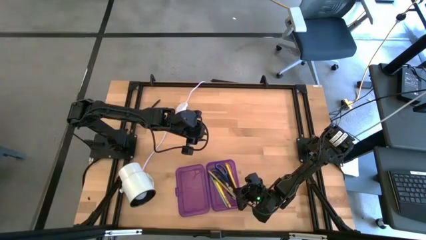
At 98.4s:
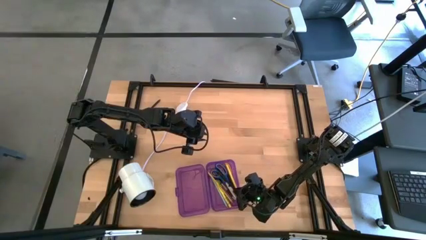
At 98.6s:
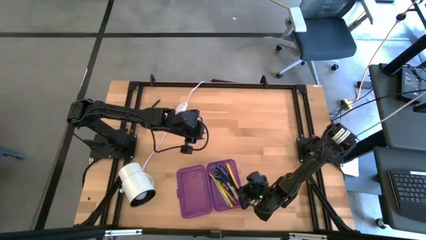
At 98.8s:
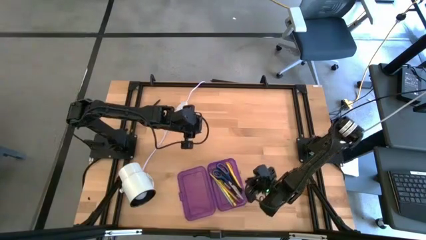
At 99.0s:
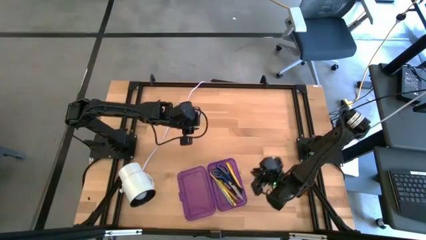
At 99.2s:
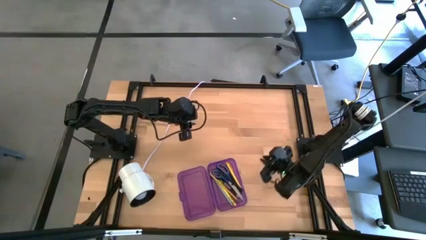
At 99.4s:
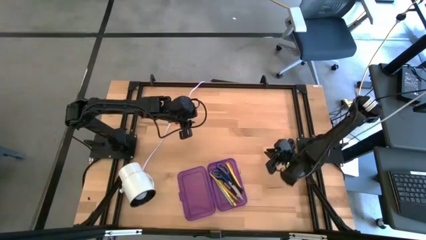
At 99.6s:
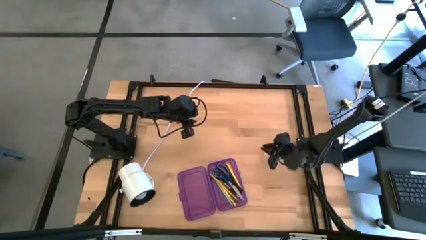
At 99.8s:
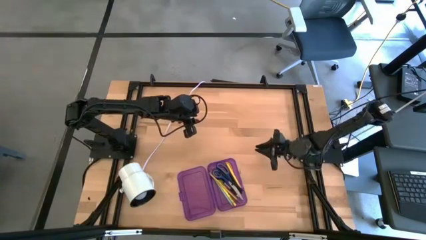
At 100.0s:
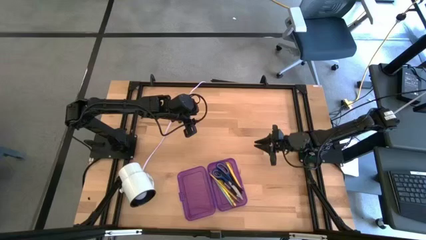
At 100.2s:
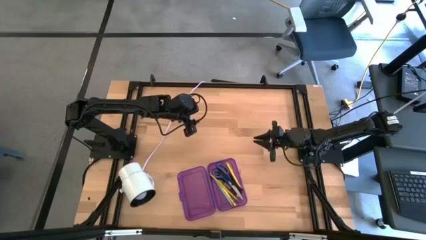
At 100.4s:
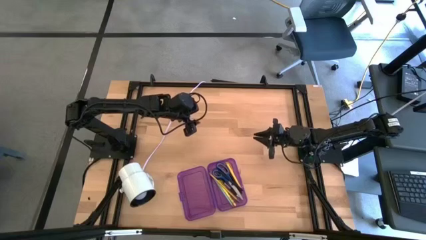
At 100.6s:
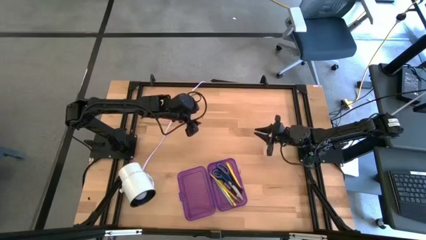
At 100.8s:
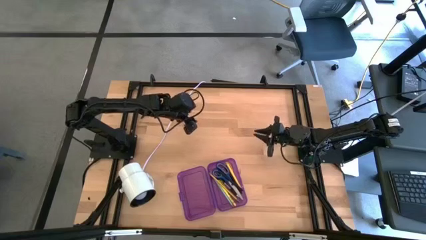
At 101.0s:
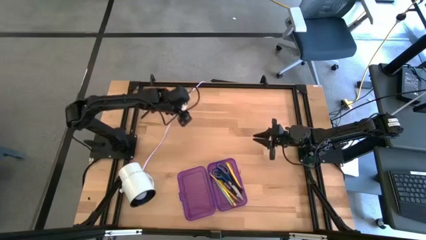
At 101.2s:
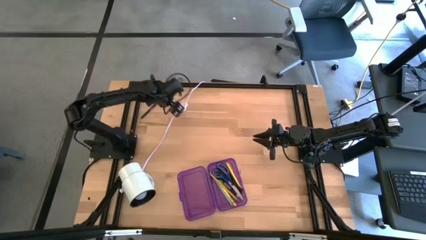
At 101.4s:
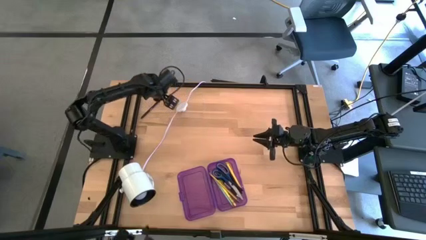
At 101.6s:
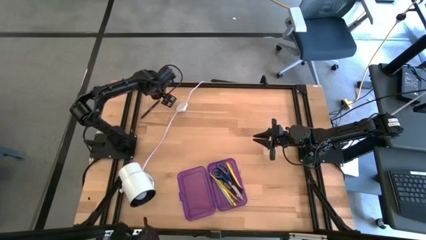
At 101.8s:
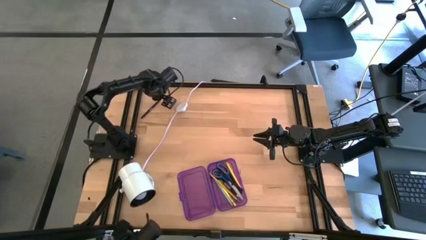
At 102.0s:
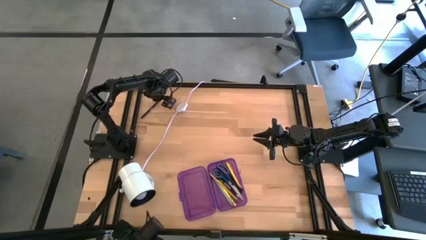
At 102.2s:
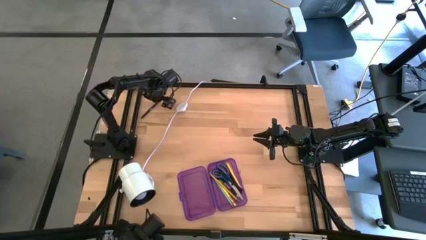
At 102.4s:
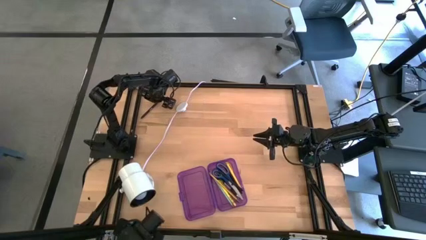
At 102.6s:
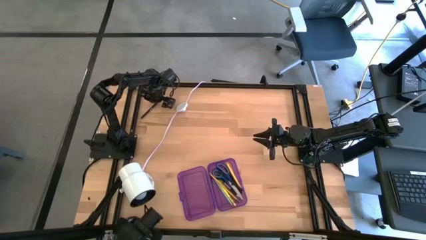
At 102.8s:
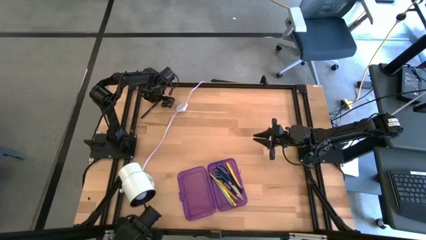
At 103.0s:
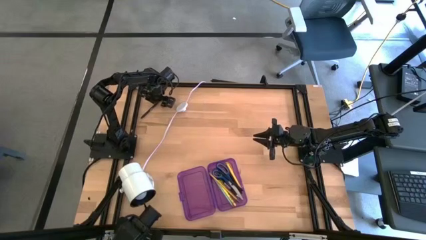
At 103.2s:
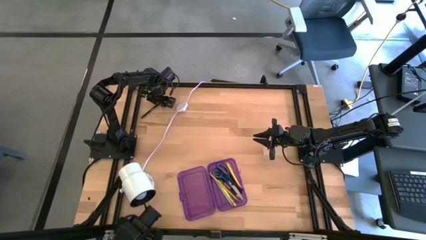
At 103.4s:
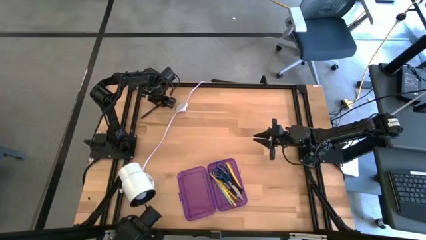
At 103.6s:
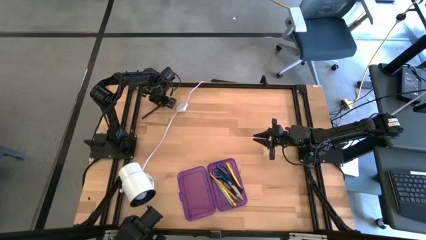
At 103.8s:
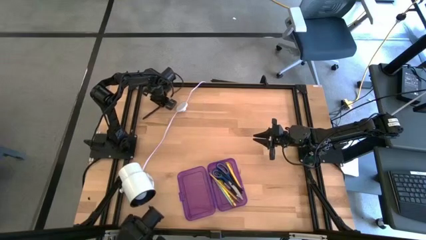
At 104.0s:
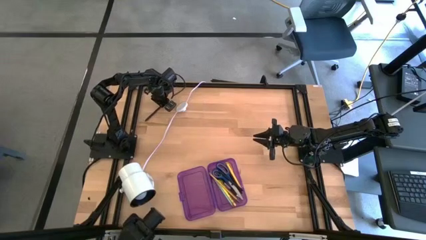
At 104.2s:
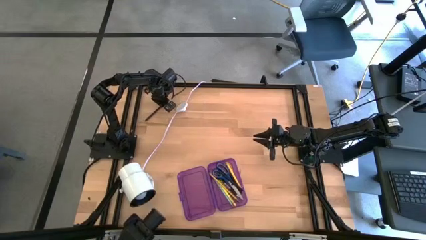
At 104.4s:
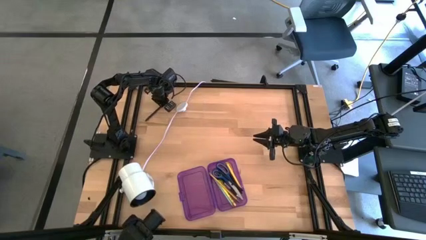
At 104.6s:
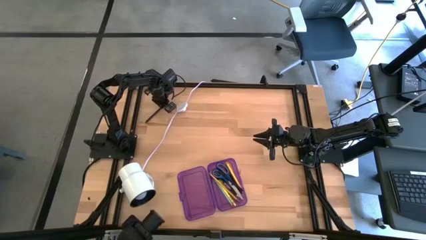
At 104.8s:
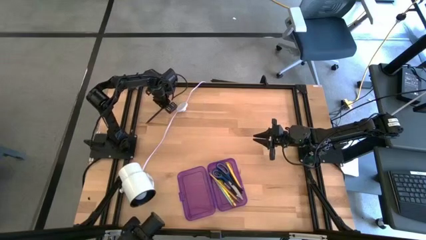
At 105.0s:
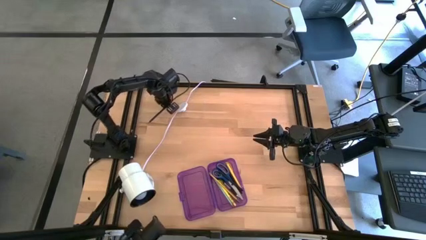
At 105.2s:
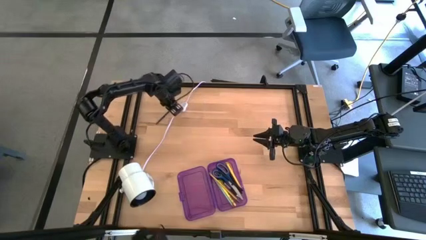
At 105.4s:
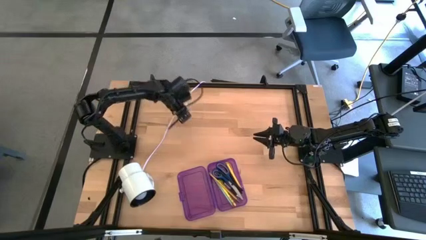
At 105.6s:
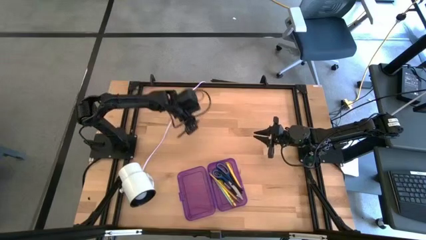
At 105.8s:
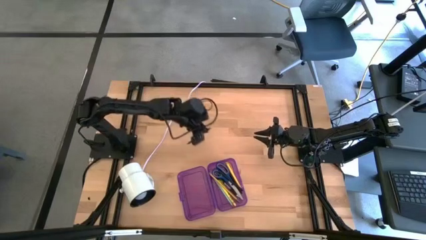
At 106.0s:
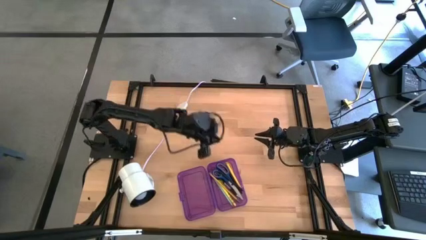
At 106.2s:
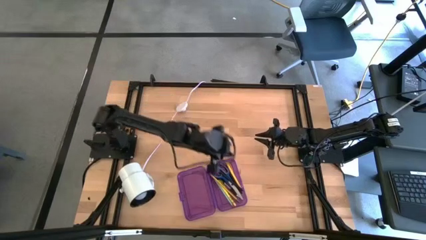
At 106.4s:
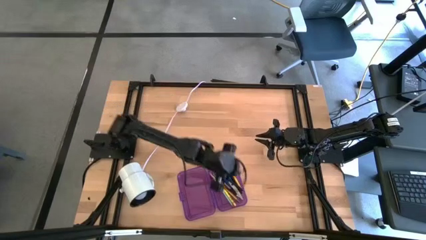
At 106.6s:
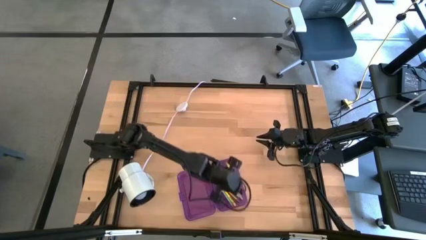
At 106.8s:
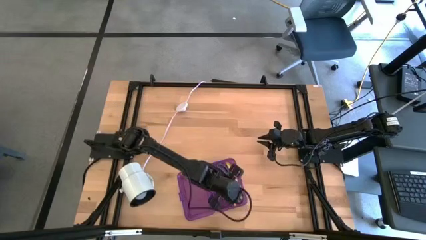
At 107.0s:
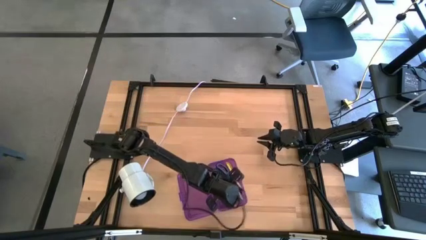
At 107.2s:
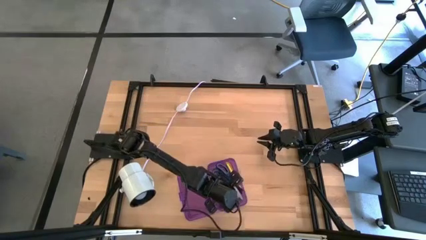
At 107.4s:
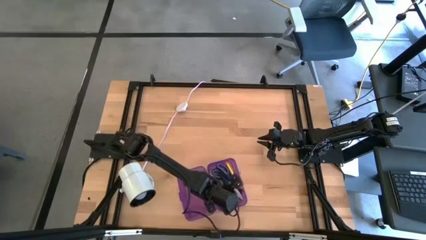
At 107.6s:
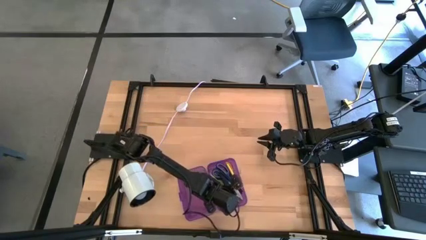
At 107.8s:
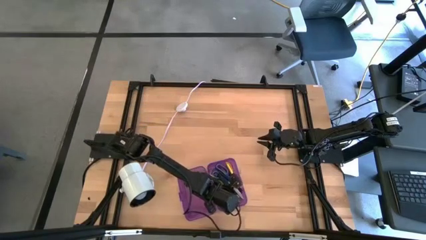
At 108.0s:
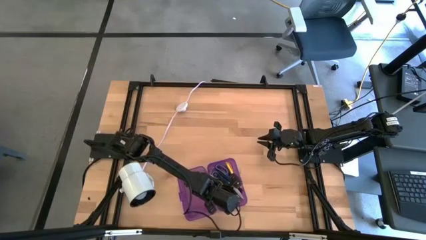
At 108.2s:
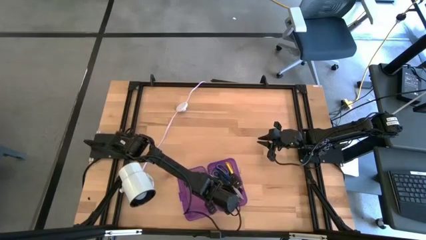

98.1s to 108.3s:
Task: Pick & place school supplies into a supply box
Put the black pen into the purple supply box

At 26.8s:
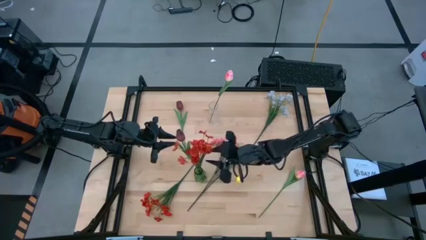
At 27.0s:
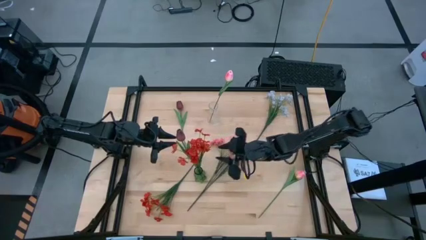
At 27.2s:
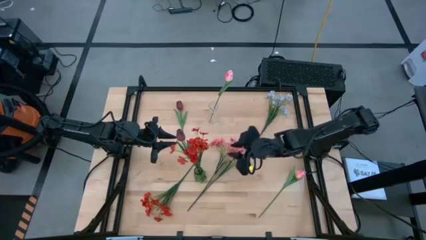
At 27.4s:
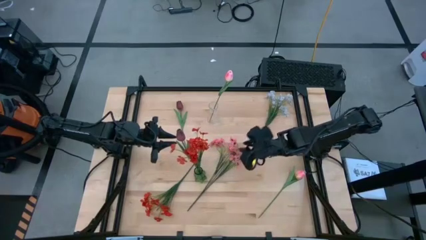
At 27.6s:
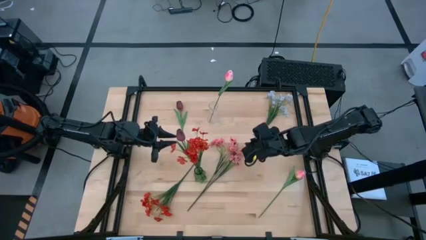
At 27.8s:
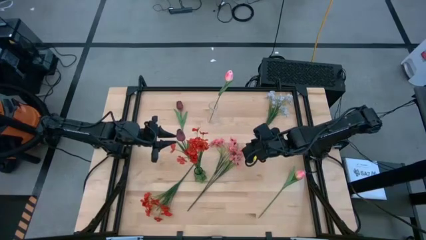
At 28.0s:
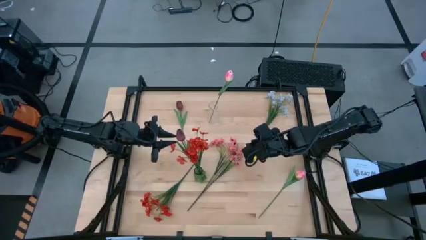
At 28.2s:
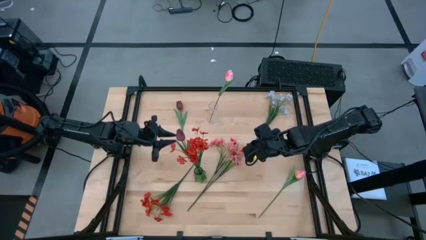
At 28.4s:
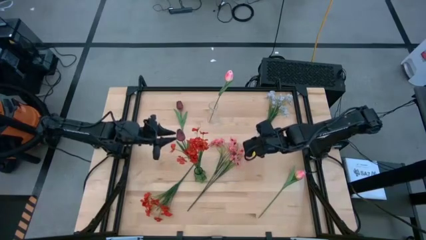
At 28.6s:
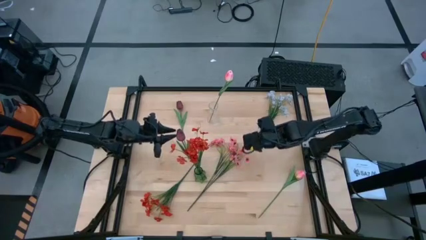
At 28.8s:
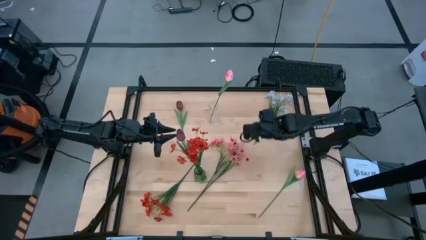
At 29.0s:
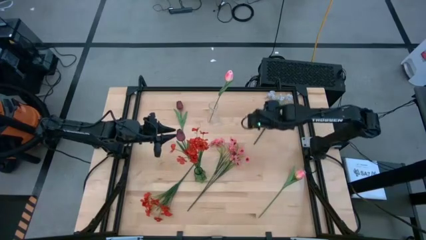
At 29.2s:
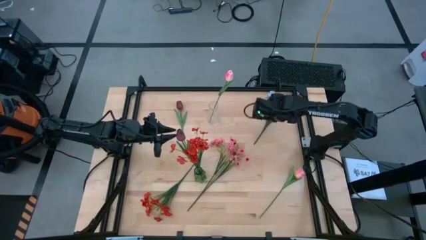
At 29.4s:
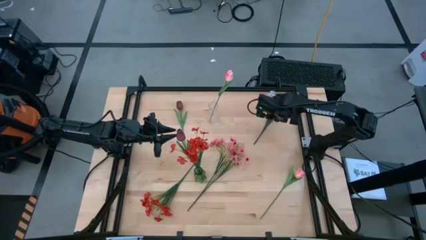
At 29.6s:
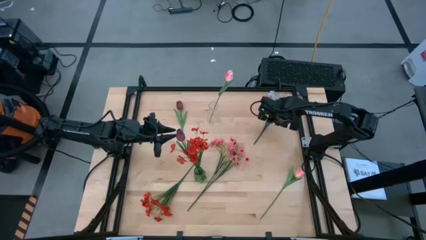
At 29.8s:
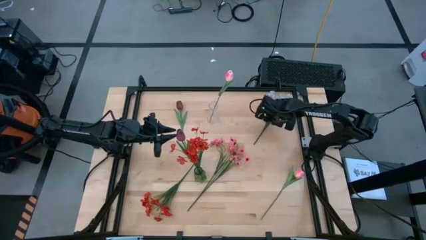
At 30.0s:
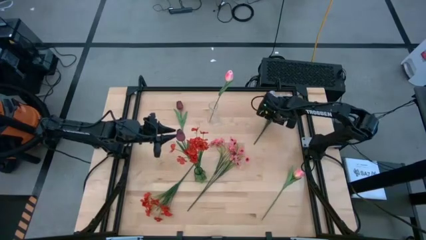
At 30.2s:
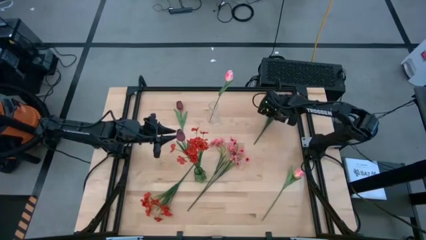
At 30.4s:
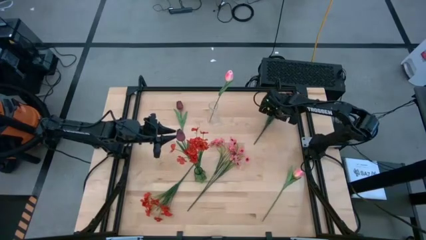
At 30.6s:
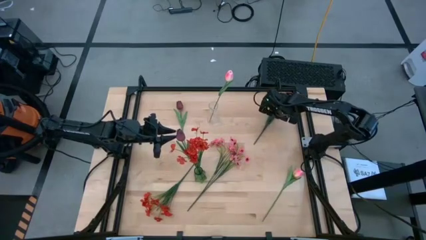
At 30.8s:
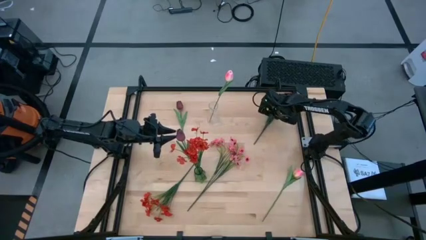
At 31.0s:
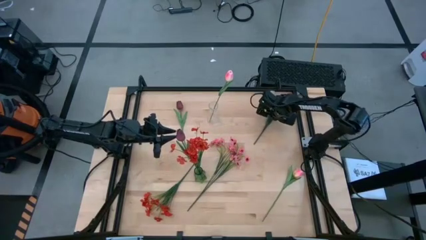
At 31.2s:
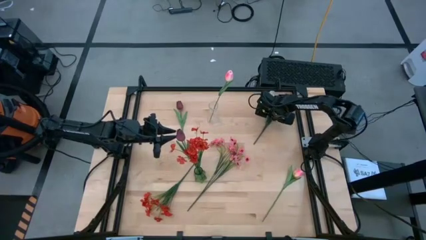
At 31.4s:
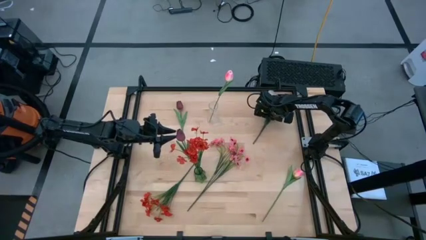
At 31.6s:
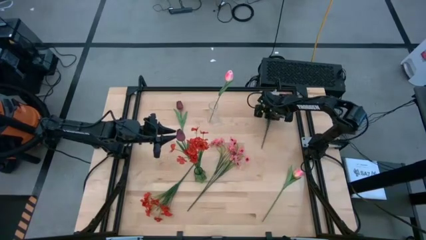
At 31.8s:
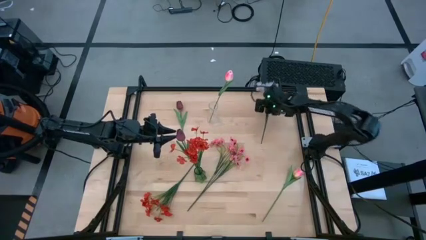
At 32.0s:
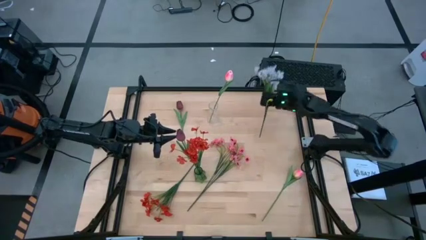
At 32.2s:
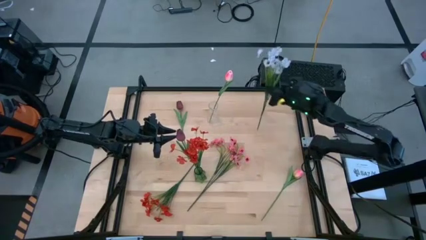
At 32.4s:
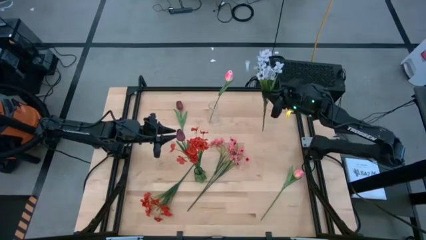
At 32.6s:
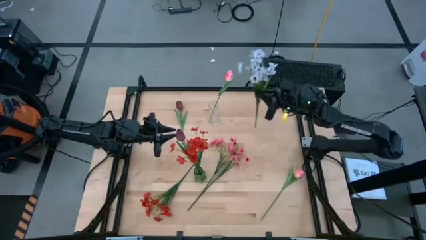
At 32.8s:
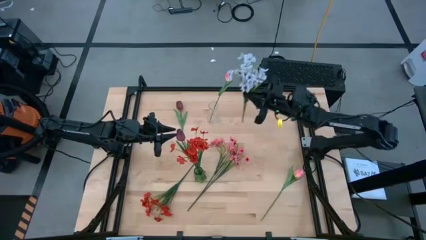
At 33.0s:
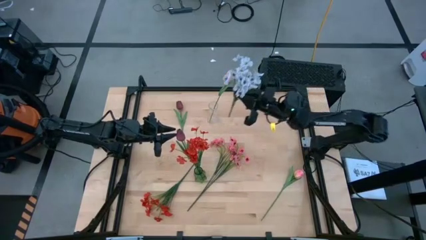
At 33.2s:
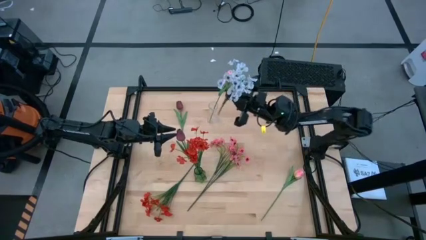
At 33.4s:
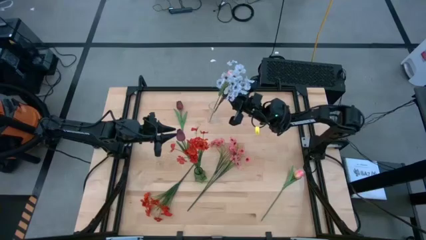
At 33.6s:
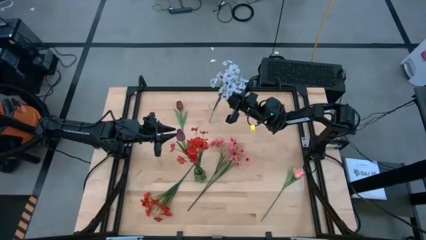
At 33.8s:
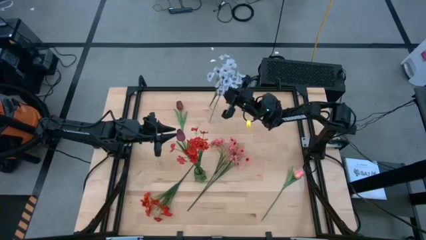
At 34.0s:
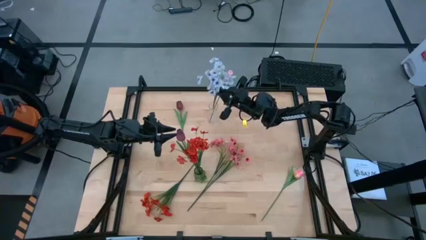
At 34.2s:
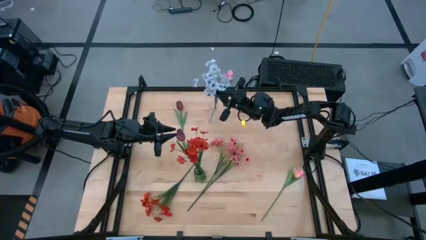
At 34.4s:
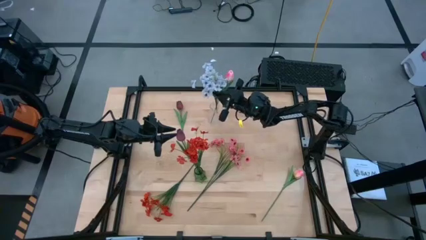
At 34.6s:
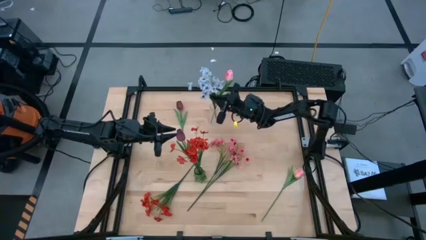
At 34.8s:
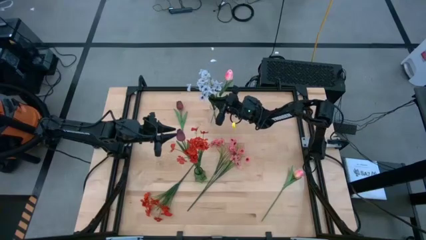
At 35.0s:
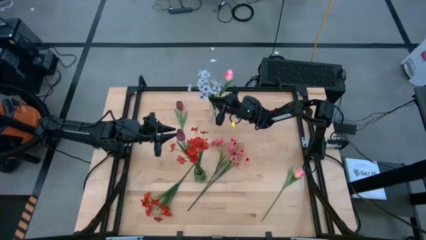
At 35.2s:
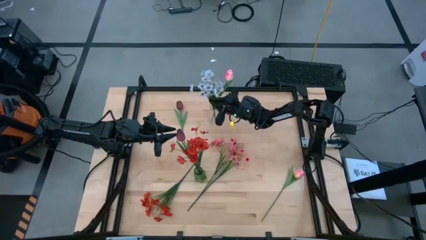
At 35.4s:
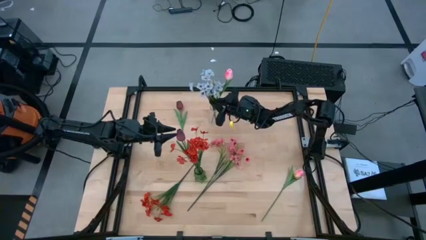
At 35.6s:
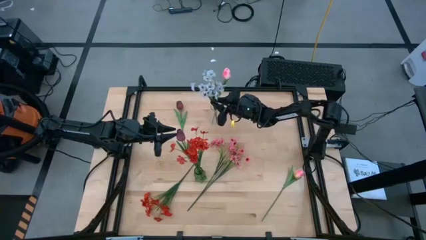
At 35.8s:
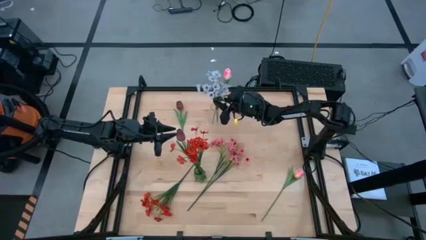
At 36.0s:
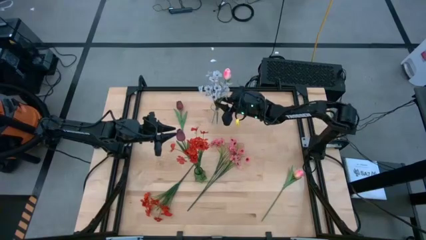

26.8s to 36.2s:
Task: Sort flowers into vase by color
Put the white flowers into the transparent flower vase
